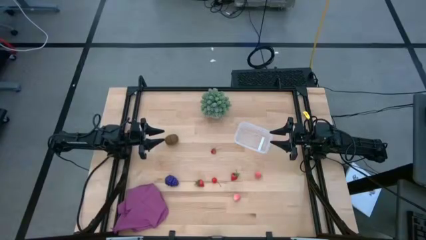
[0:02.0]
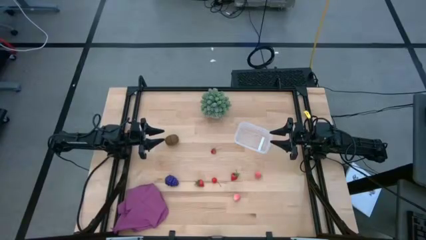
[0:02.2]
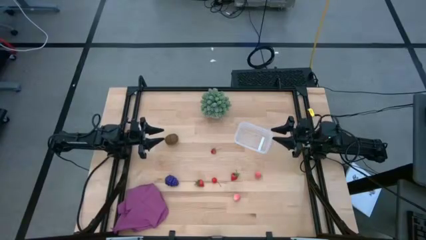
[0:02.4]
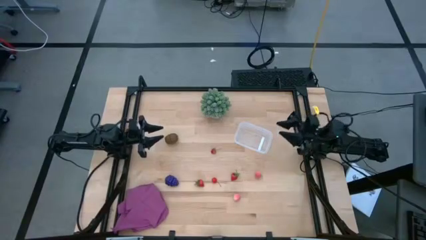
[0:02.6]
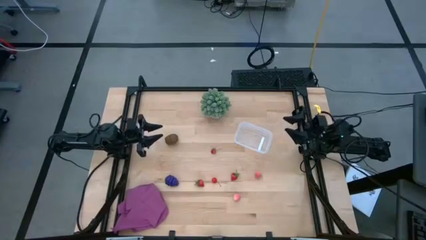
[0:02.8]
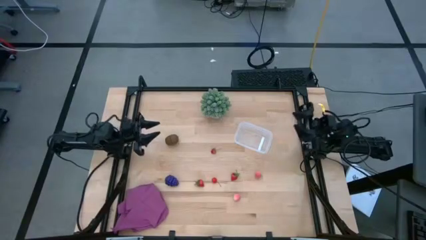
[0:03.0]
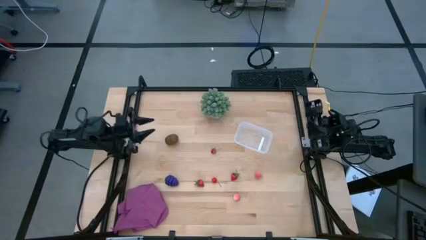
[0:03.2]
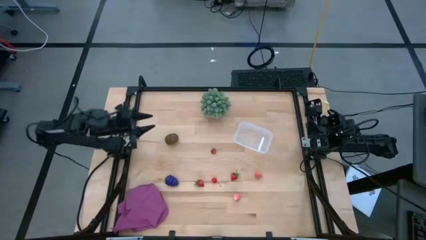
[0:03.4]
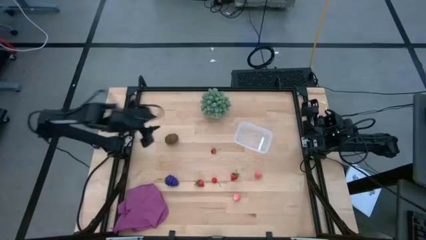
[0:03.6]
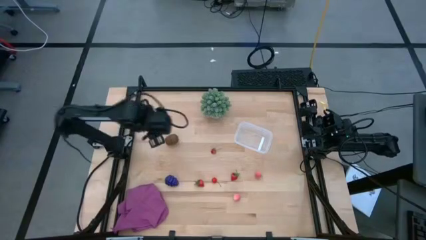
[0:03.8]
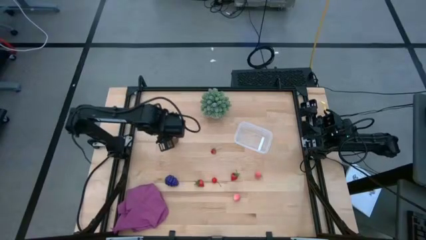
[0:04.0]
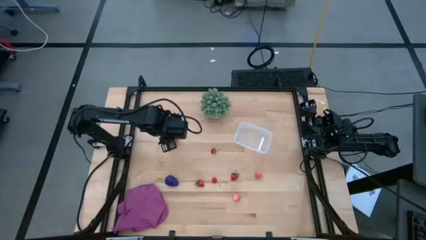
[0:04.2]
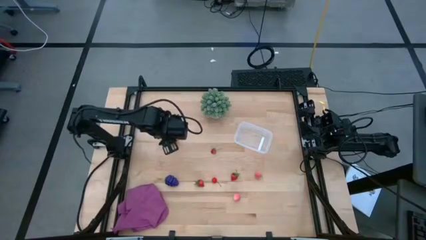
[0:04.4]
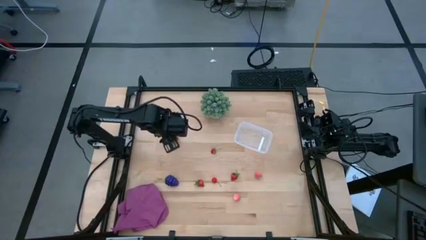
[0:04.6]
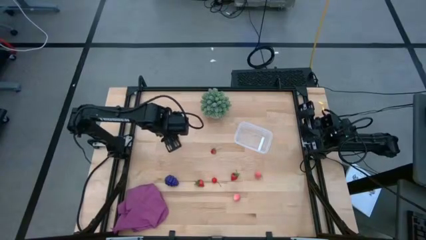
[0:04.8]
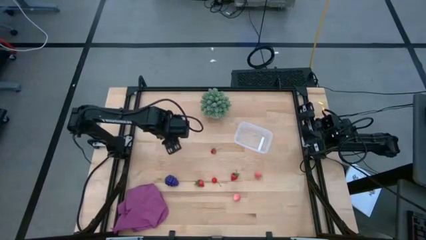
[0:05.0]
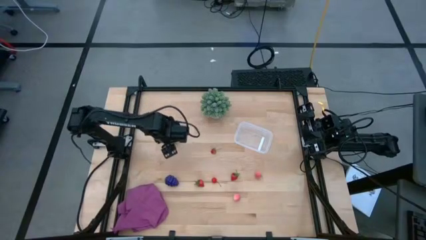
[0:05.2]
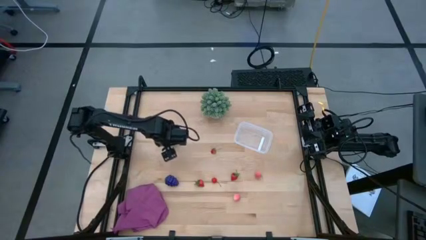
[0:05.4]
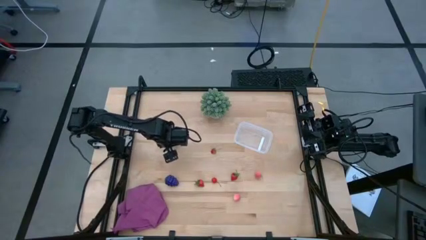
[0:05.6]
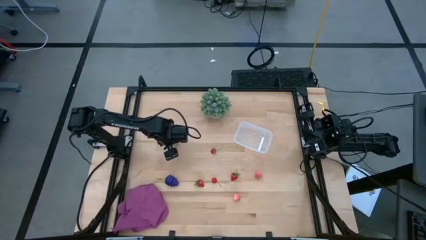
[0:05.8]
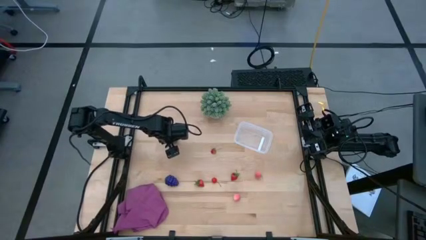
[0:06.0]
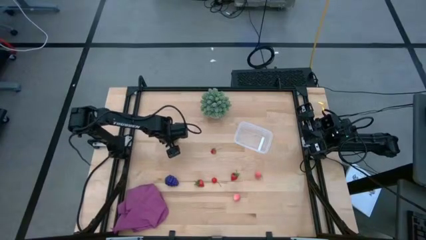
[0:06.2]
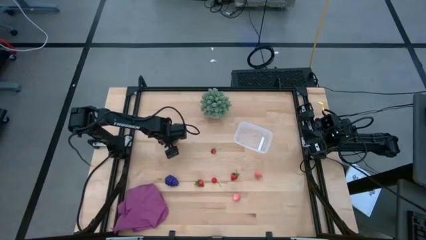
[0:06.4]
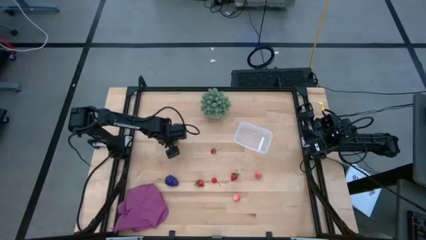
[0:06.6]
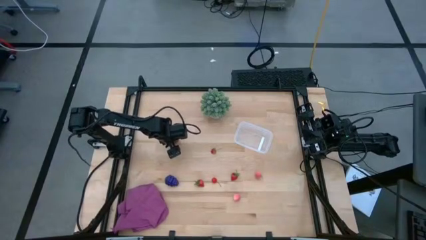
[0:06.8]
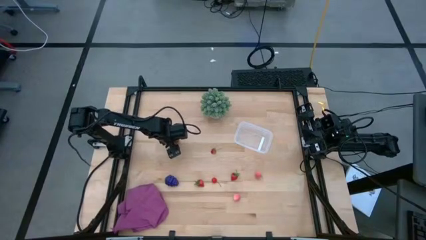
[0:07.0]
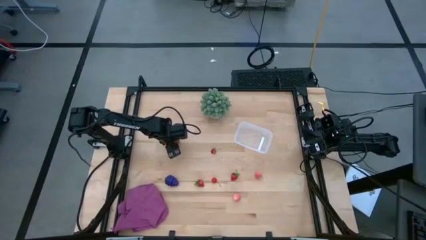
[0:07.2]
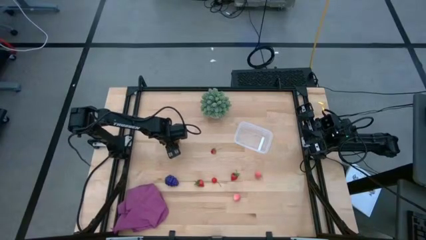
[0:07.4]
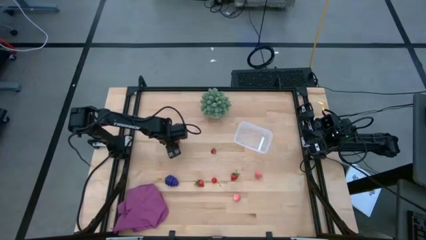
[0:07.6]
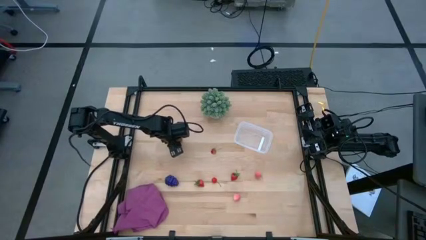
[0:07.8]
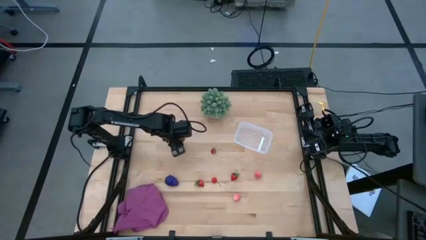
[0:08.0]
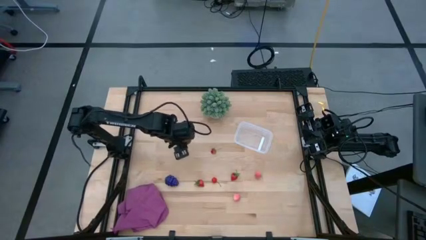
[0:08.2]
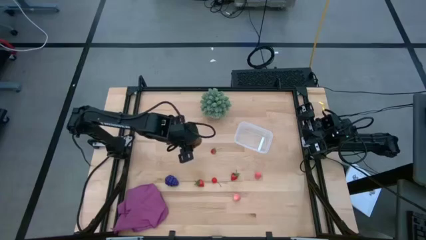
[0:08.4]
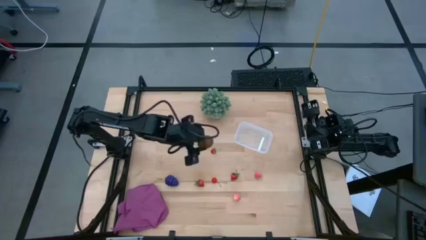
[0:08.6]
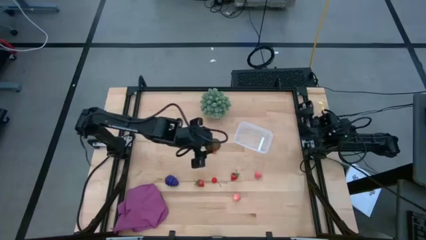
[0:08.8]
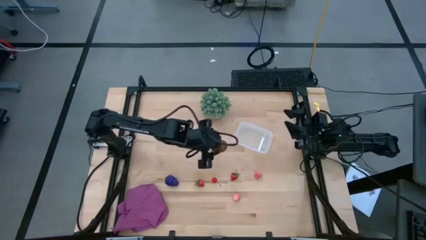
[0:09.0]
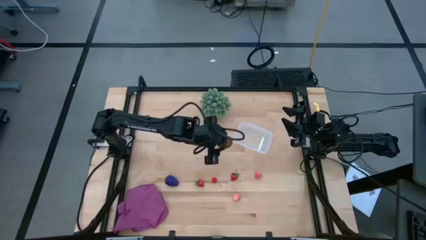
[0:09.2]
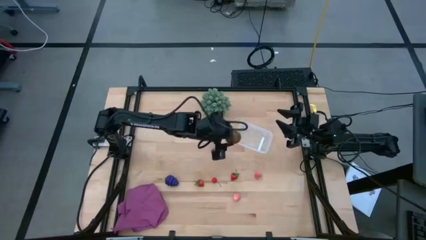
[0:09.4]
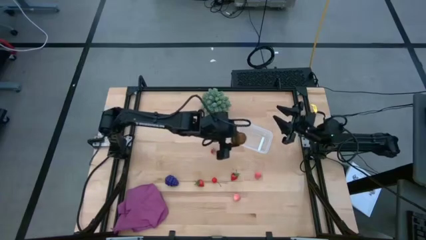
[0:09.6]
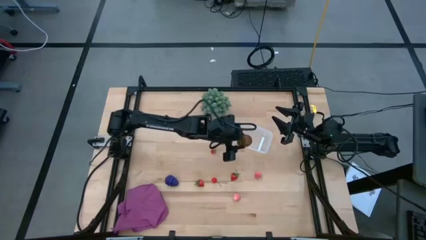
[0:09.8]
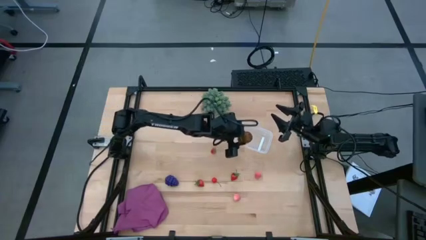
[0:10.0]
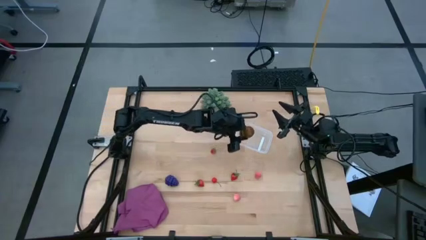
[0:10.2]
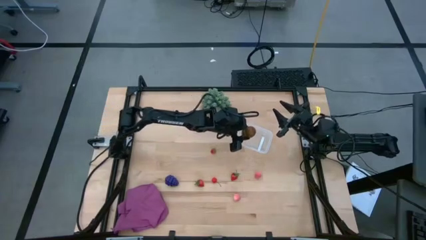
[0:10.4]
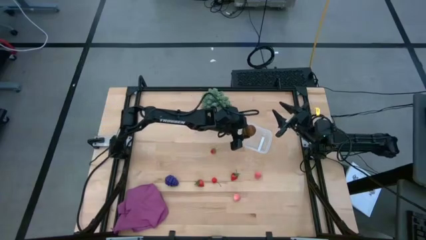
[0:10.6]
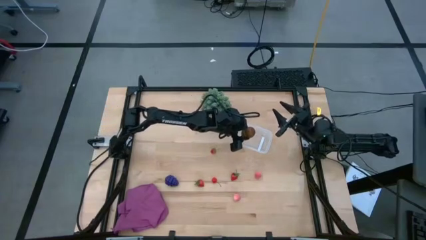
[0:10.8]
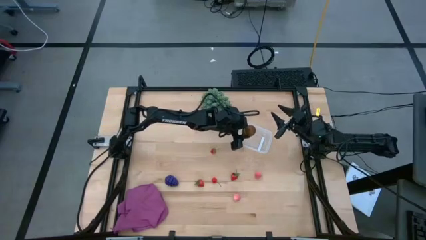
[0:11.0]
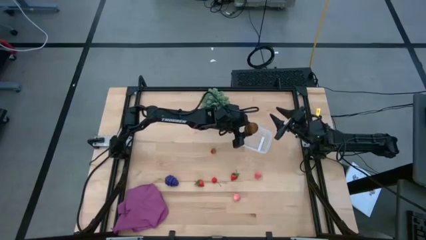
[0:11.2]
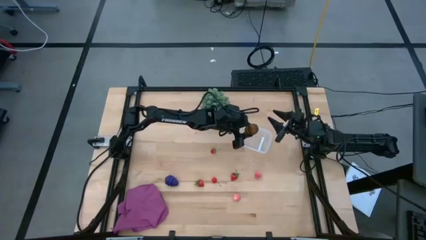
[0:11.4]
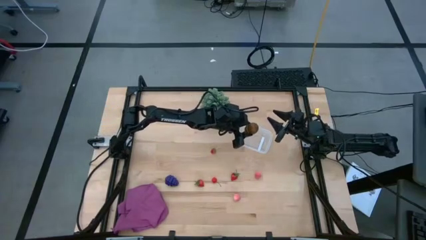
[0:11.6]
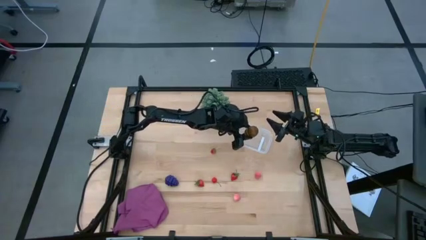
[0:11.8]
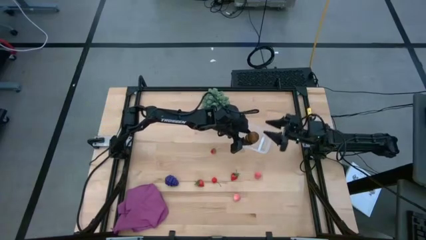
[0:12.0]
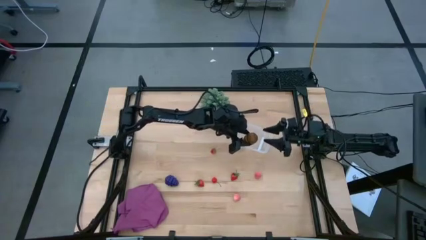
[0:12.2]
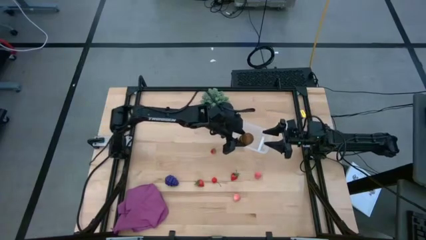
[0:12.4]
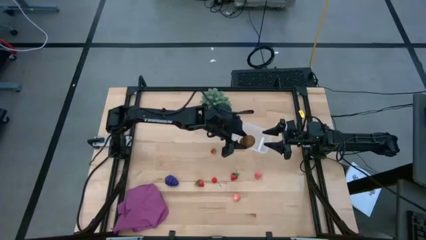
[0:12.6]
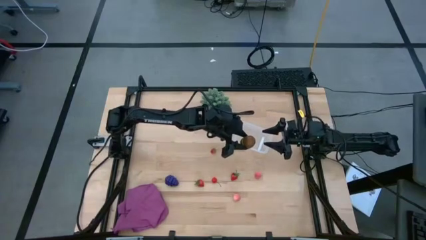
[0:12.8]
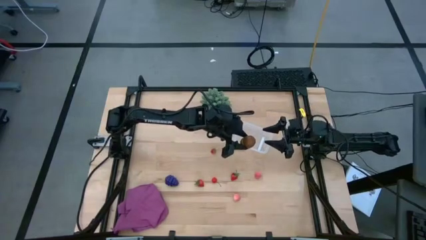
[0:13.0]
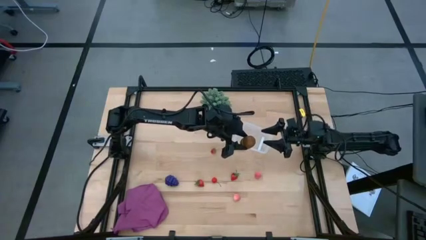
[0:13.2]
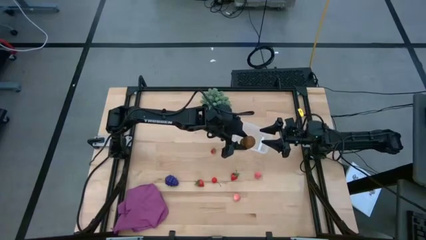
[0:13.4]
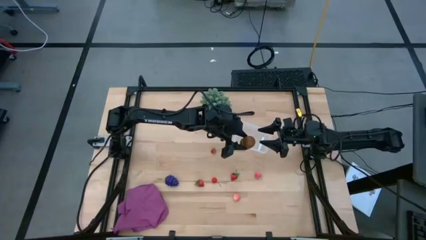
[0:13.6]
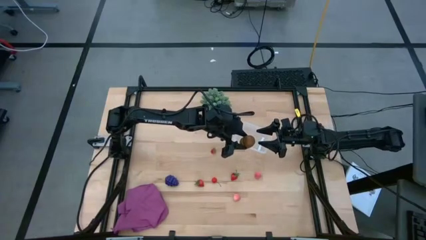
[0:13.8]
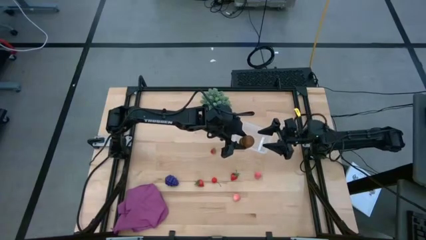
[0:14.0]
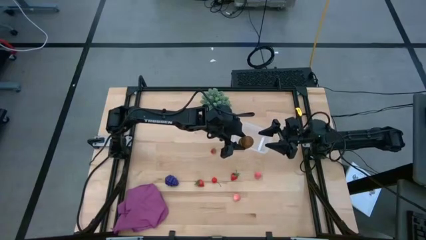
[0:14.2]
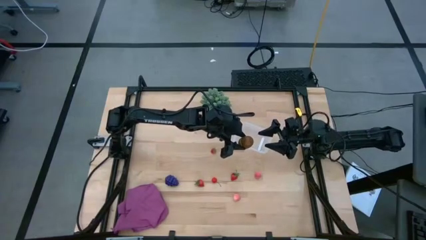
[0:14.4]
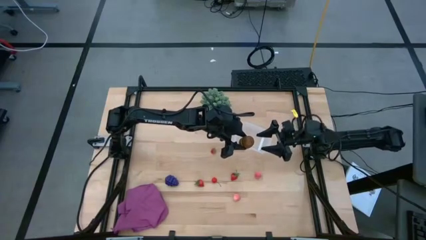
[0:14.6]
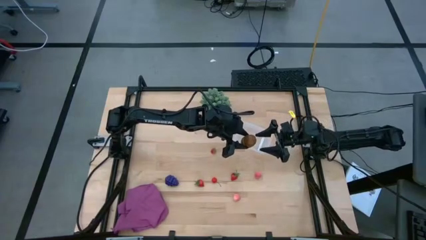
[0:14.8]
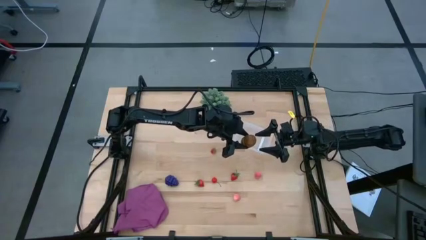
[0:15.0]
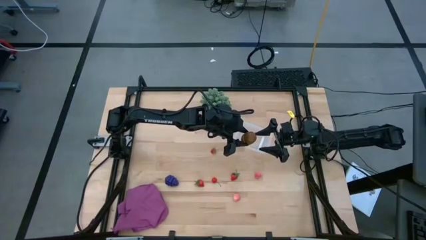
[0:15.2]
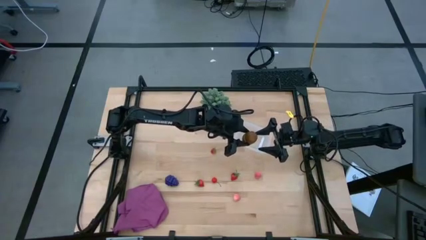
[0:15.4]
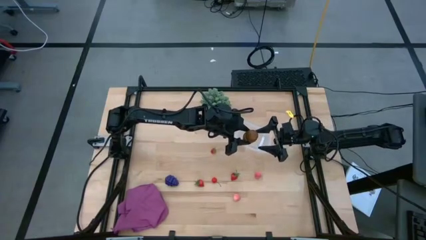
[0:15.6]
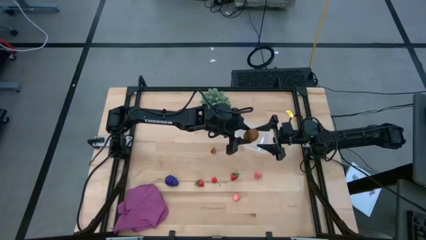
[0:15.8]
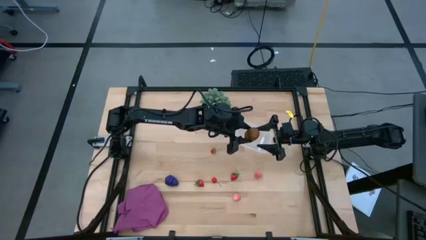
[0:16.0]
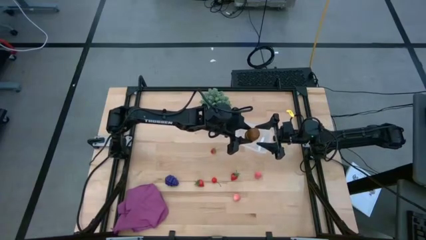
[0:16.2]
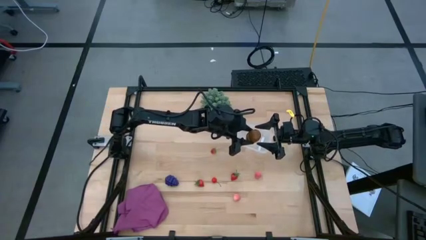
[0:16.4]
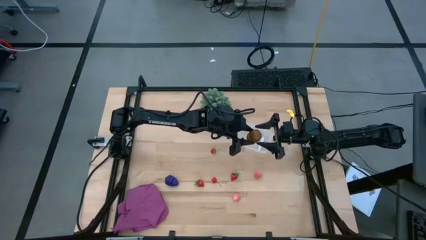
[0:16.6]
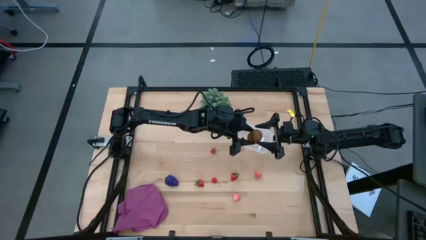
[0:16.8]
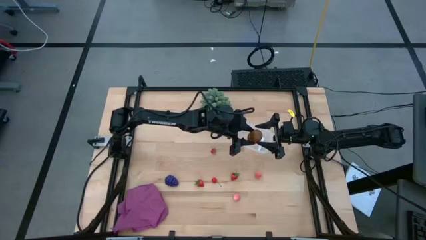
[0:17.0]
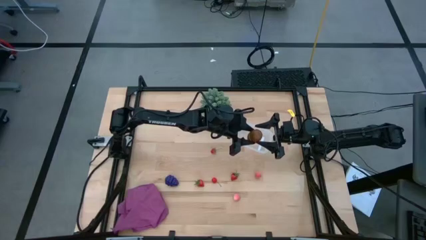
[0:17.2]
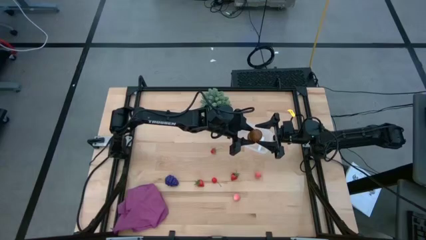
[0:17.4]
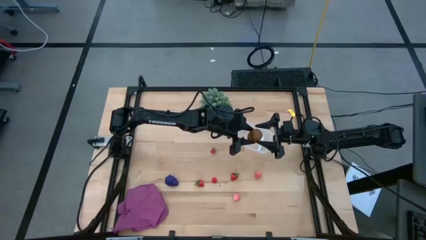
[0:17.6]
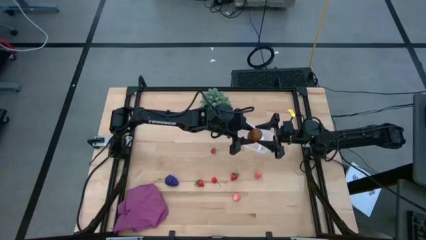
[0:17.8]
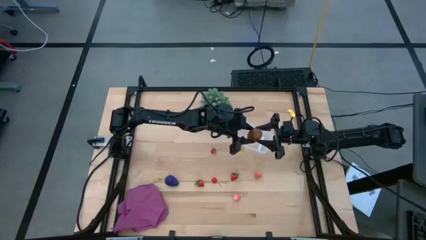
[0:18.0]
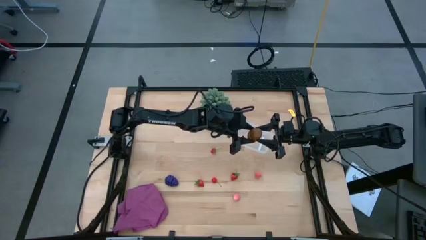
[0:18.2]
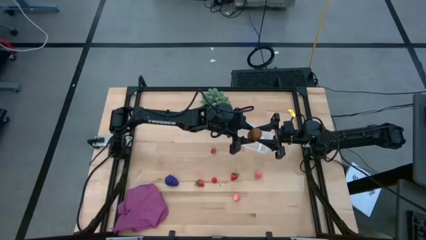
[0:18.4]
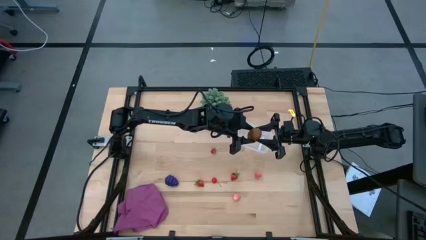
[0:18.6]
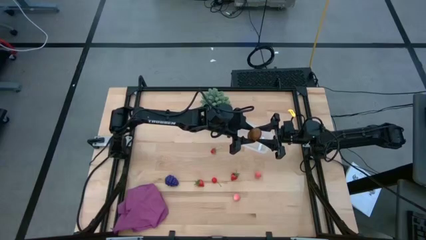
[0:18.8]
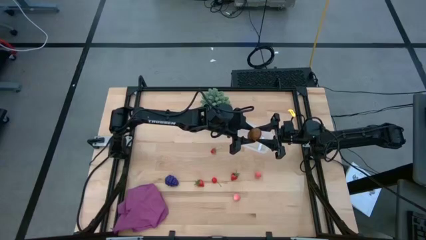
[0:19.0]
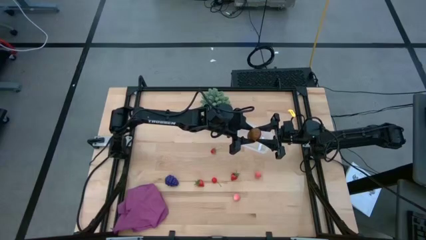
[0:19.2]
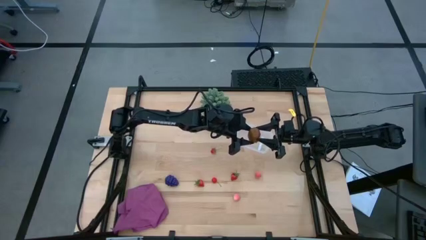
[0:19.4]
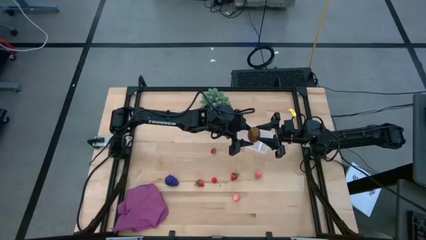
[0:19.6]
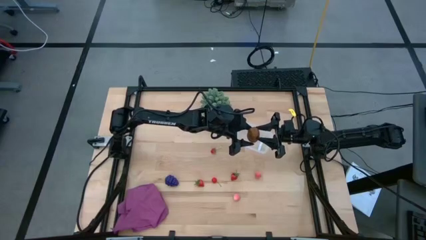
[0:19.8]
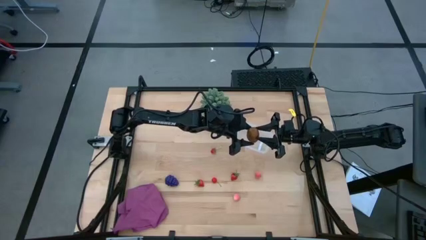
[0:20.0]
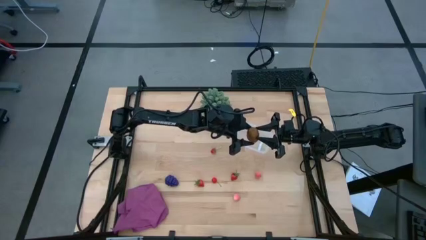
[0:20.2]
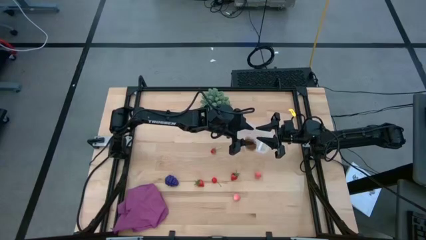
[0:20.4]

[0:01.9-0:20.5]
Task: Pick and placing Produce into tupperware
Put the brown kiwi into the transparent bin
